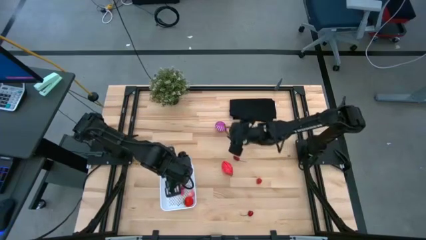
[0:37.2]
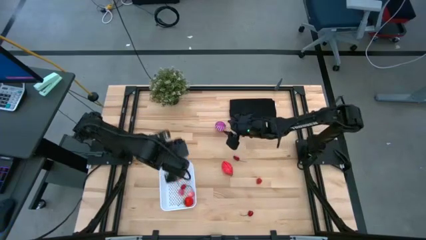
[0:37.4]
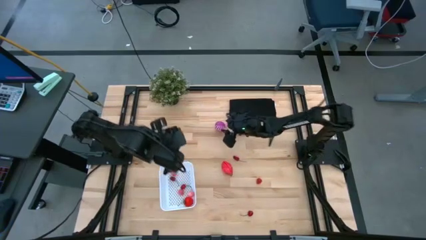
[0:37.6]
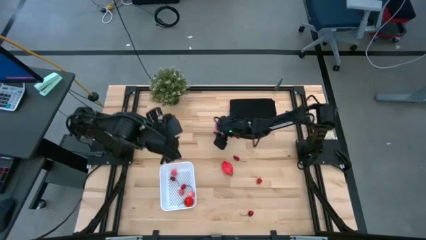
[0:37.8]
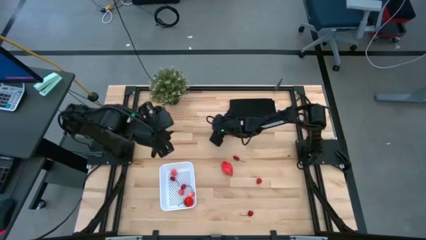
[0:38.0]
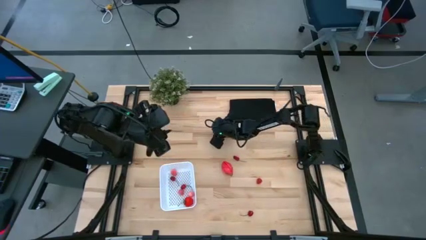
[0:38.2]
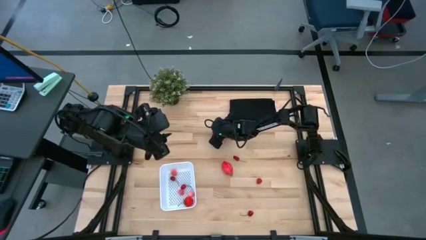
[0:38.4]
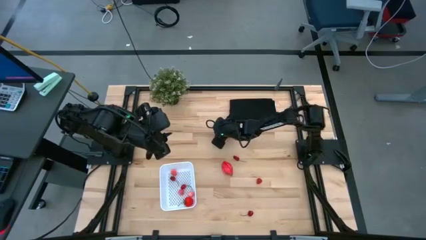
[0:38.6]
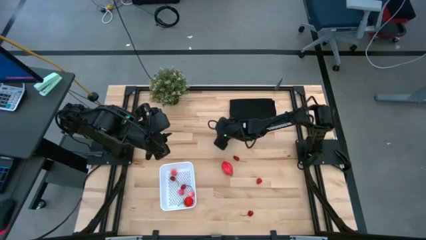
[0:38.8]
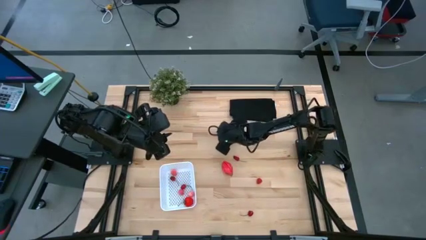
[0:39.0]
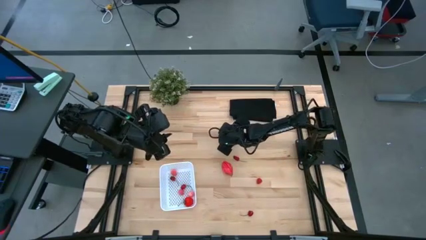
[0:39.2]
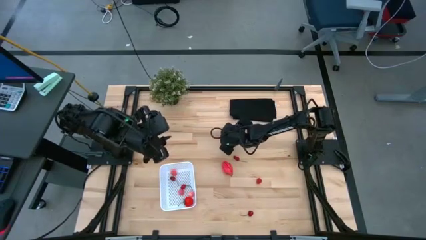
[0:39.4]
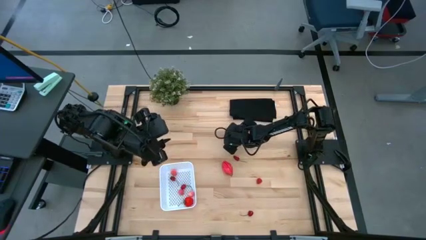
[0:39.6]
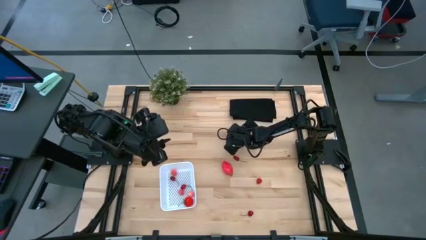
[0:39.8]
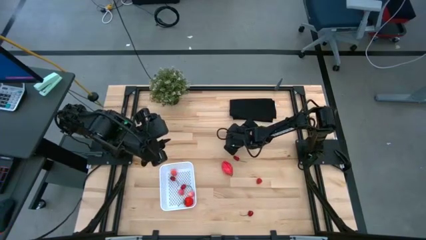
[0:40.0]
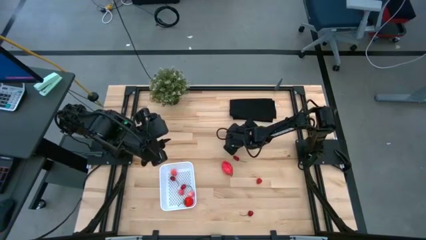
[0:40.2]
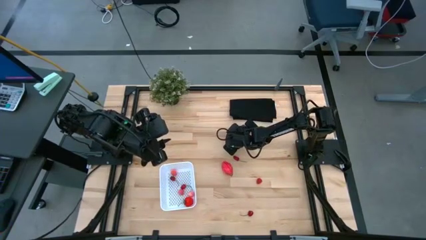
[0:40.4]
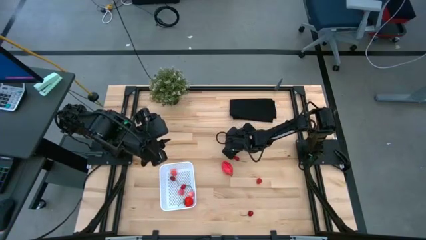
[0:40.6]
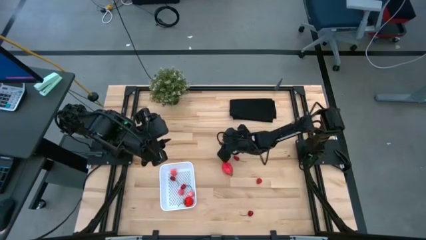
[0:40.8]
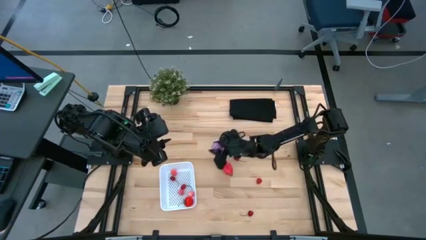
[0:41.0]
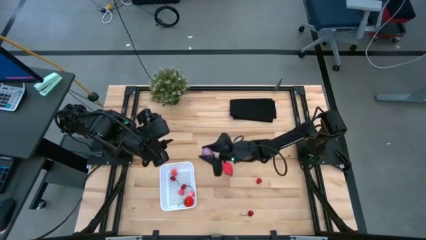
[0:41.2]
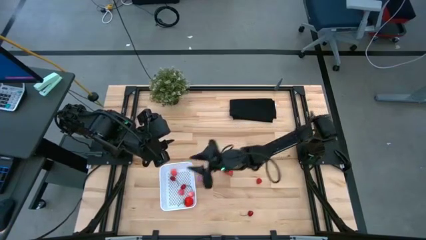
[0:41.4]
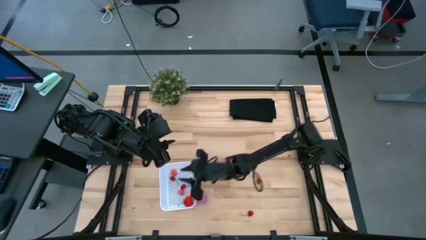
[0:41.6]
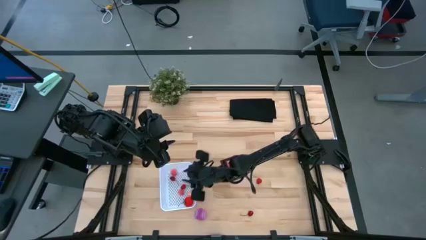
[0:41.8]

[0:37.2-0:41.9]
Task: Pick and placing Produce into tupperware
Put the onion into the white bin

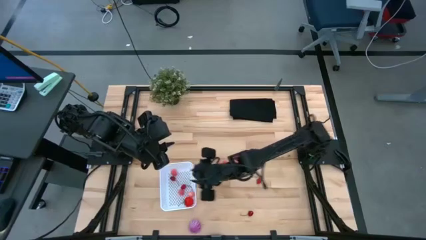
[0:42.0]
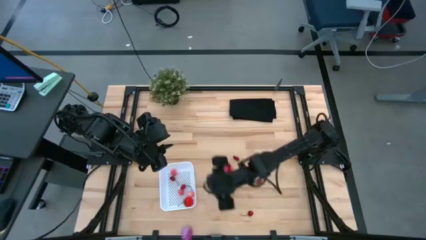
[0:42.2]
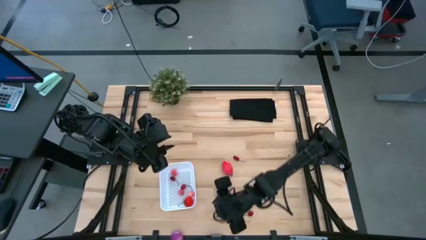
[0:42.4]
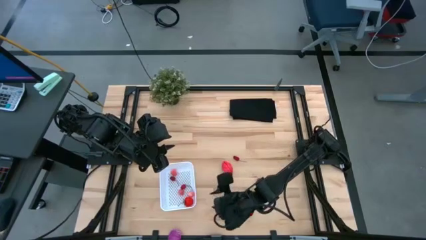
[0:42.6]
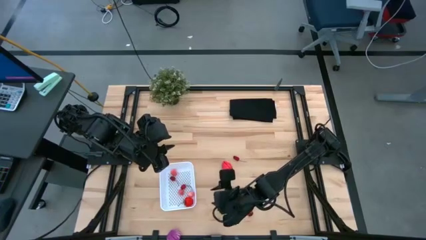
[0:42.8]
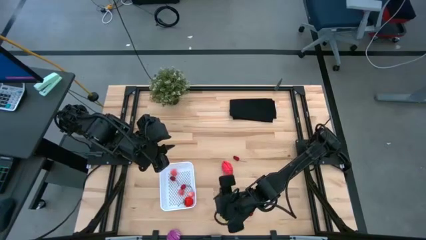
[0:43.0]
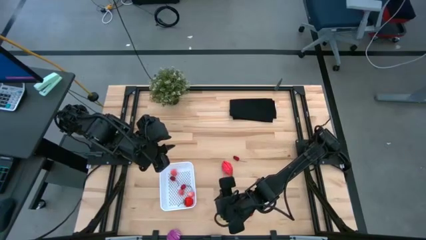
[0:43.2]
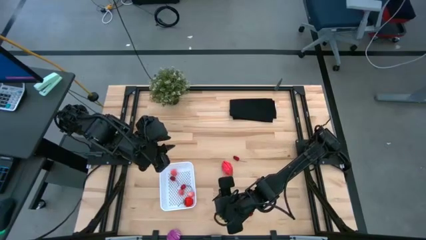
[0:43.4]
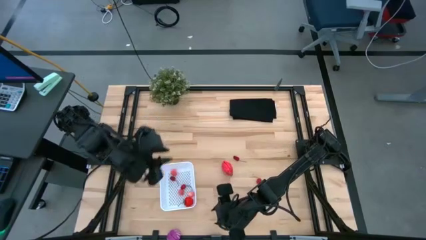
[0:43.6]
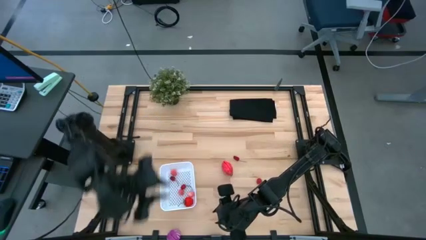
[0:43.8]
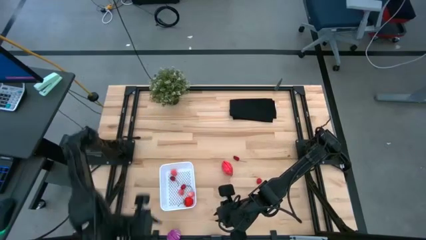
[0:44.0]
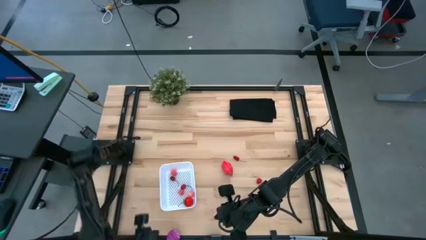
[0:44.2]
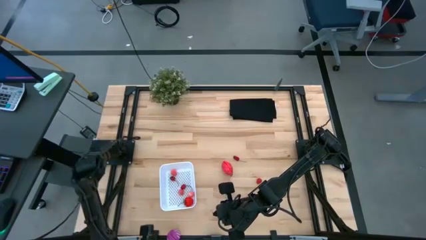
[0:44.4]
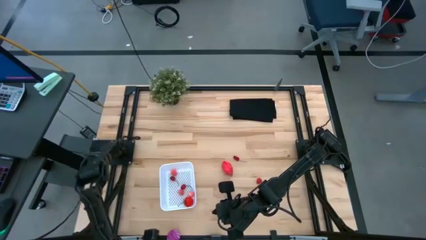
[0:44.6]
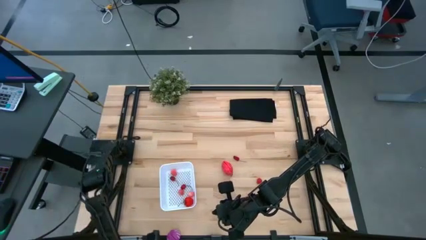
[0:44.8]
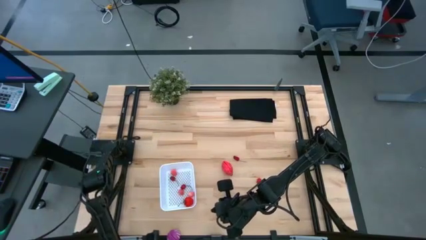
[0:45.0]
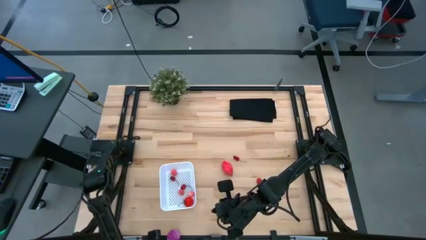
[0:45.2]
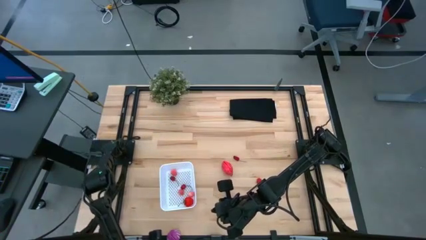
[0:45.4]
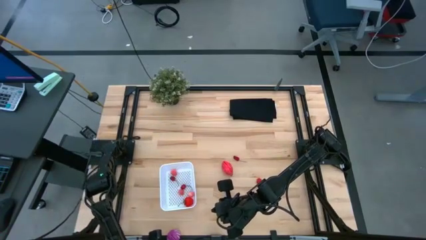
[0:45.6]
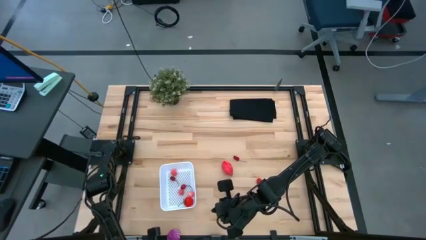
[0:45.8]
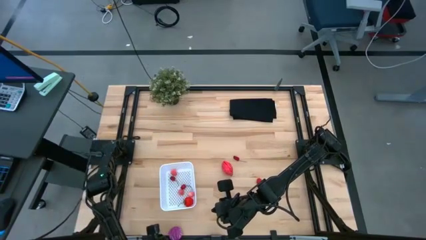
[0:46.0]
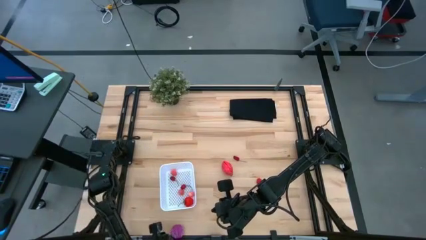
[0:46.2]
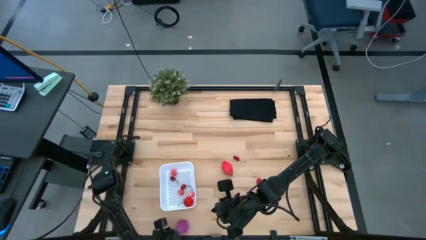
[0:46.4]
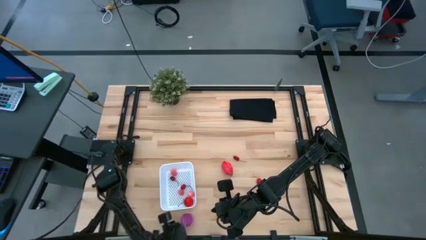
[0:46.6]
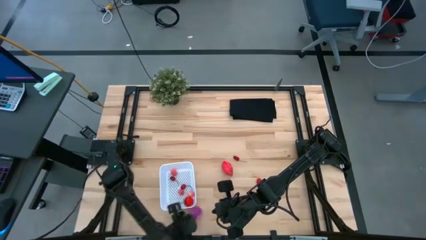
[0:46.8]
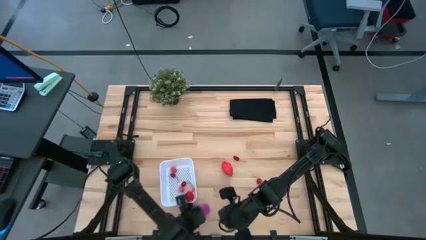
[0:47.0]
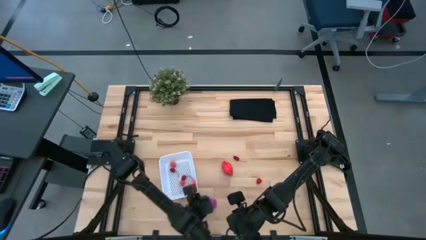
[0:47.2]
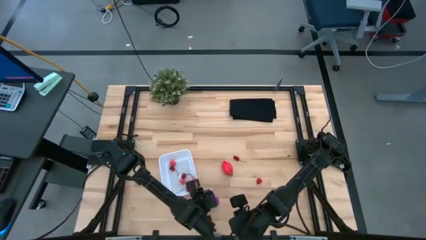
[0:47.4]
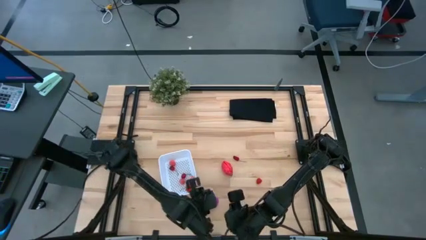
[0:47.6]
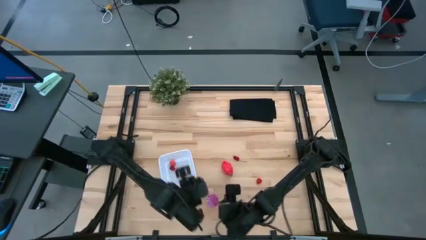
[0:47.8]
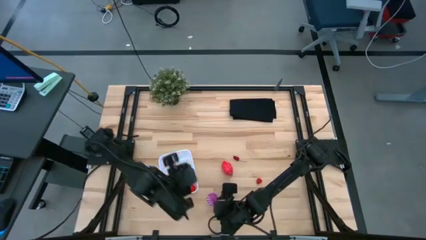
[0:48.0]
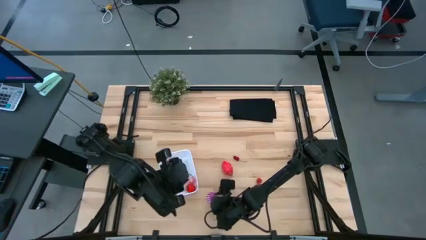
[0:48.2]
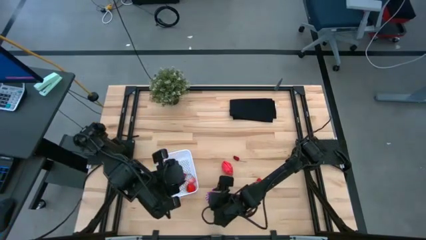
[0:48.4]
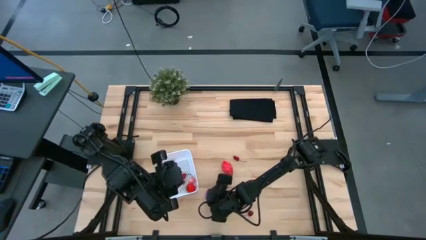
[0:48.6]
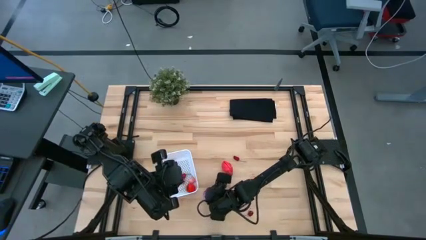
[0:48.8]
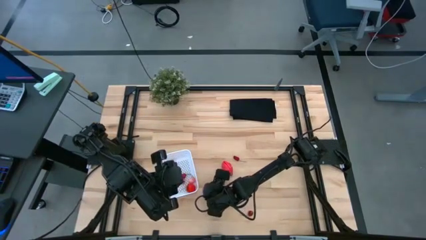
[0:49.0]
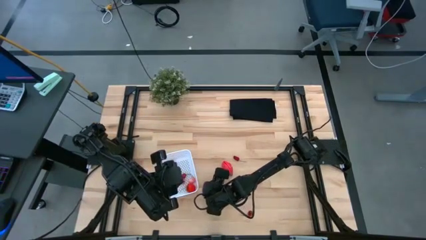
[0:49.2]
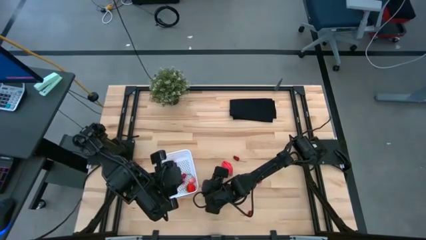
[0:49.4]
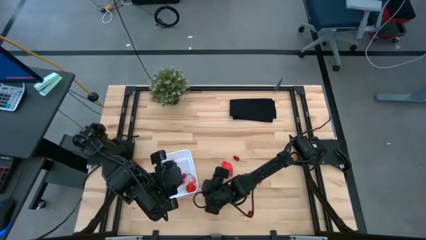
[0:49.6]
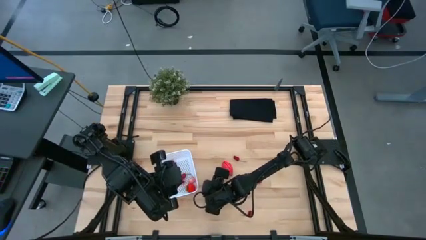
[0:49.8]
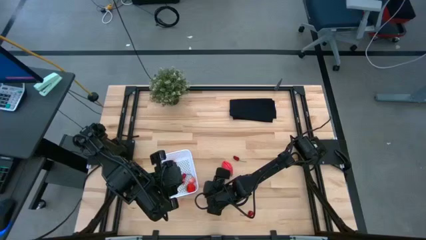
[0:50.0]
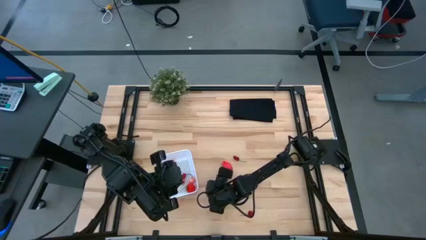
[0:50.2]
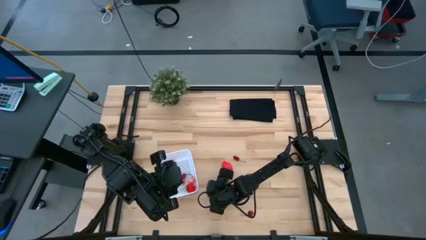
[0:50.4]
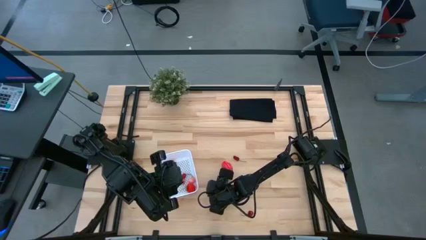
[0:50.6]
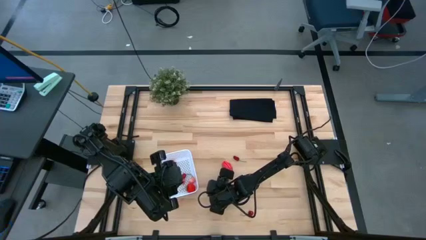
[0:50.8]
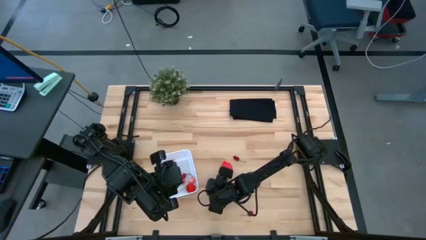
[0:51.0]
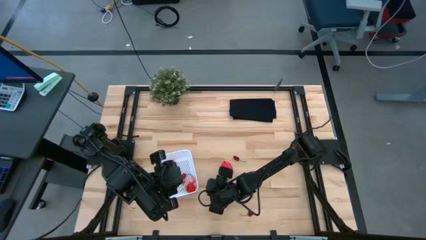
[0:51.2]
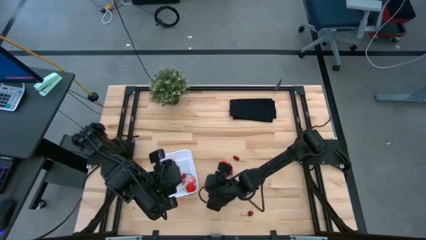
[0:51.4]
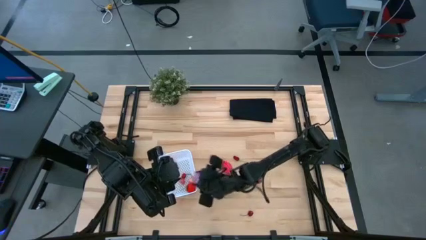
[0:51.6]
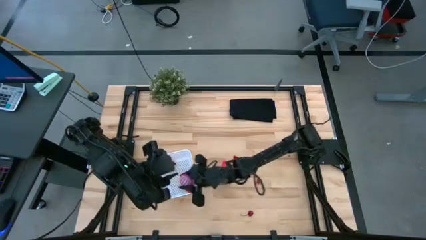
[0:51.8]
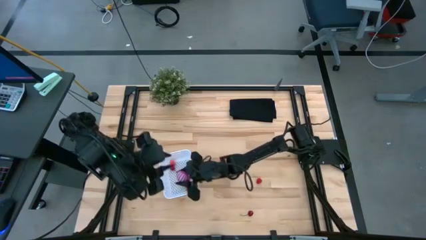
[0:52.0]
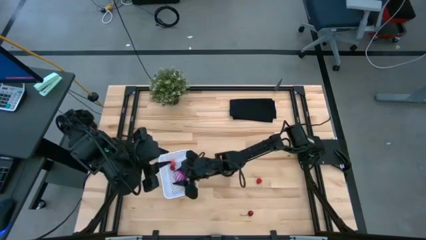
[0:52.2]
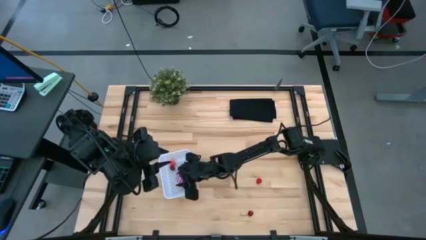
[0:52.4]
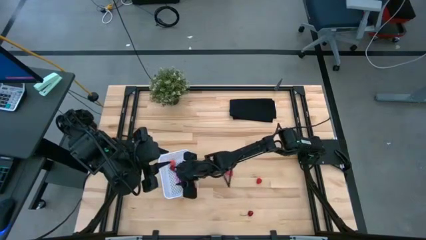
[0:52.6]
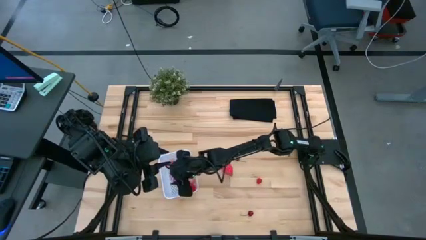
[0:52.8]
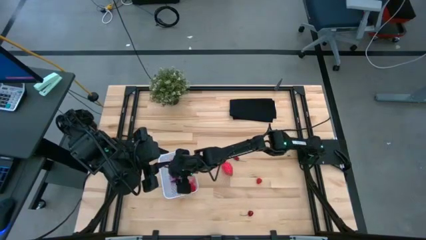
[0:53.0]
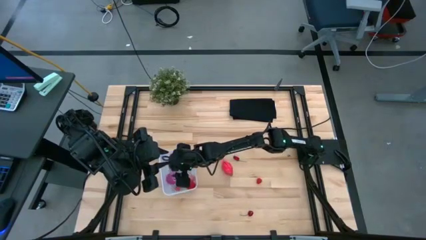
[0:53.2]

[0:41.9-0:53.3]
Put the onion into the white bin
